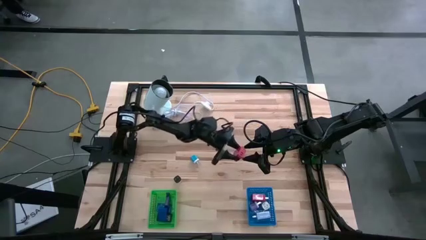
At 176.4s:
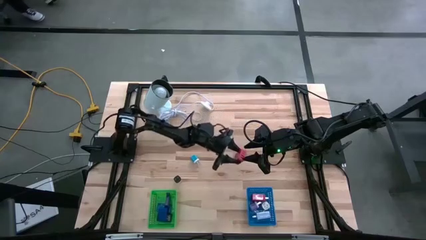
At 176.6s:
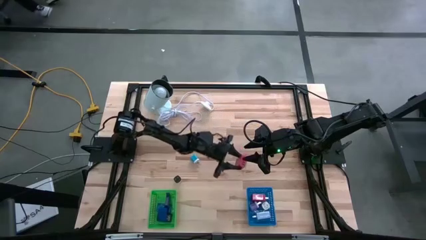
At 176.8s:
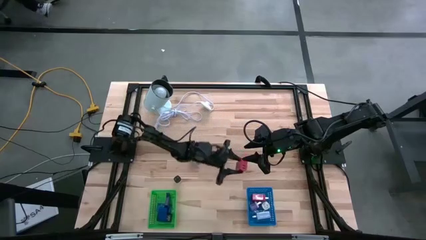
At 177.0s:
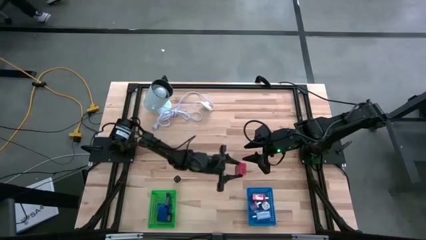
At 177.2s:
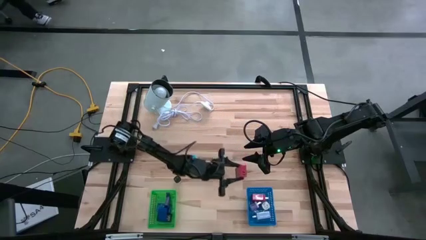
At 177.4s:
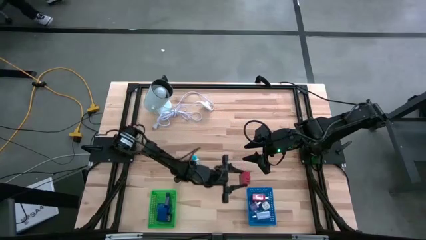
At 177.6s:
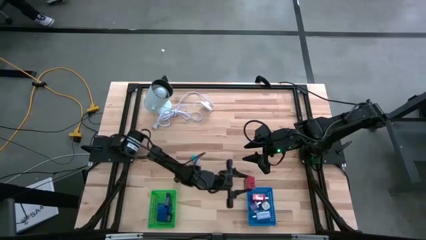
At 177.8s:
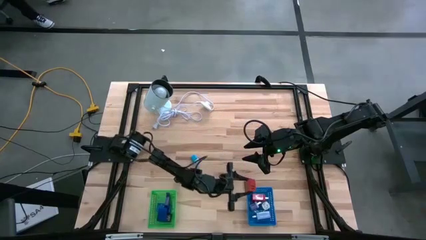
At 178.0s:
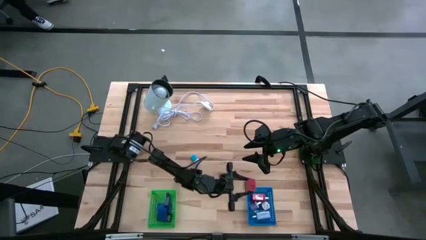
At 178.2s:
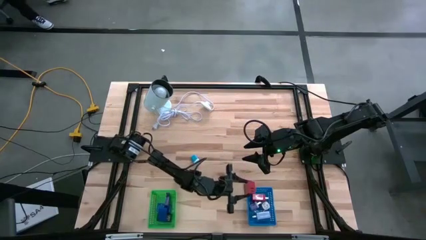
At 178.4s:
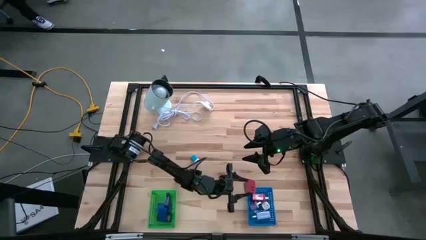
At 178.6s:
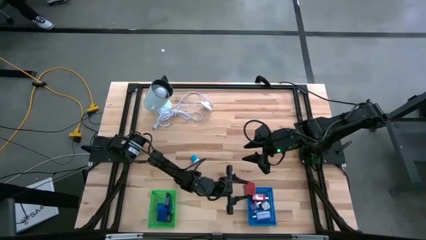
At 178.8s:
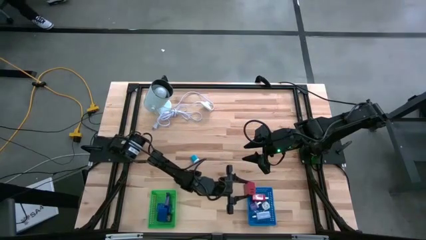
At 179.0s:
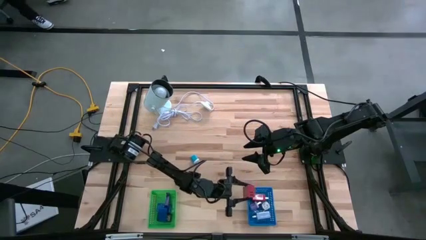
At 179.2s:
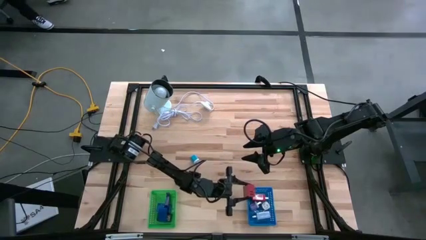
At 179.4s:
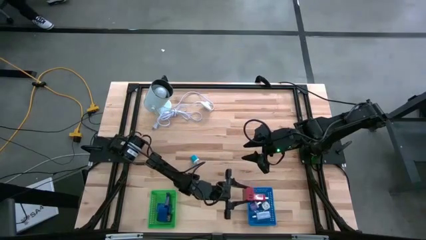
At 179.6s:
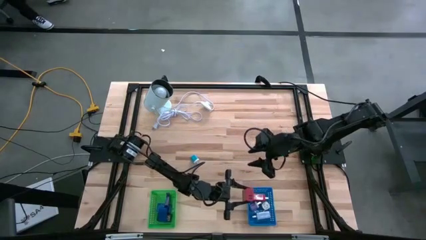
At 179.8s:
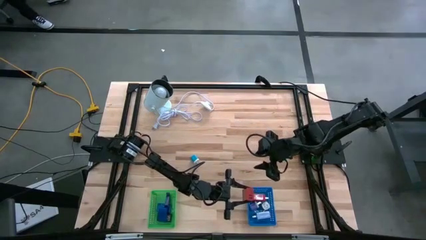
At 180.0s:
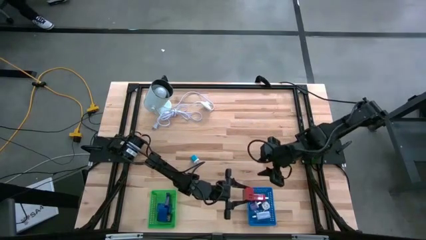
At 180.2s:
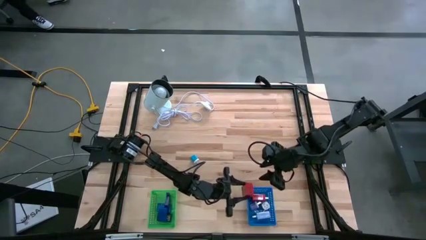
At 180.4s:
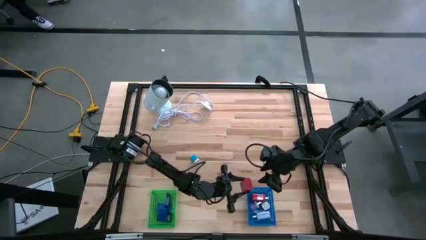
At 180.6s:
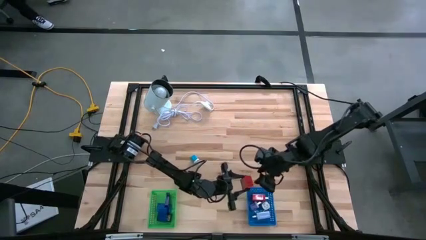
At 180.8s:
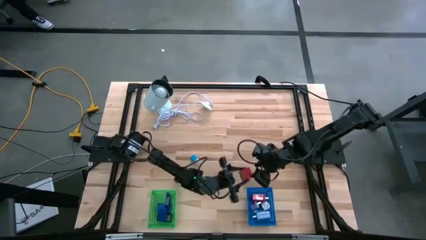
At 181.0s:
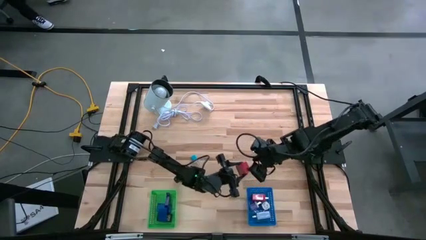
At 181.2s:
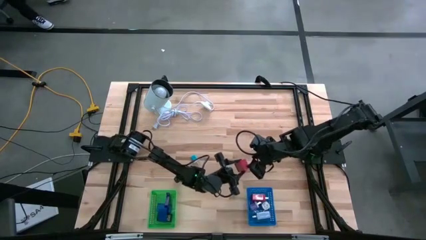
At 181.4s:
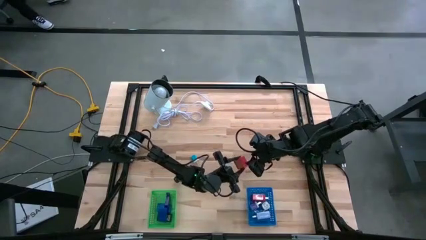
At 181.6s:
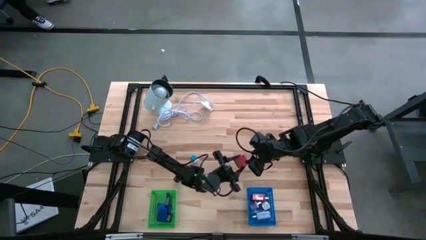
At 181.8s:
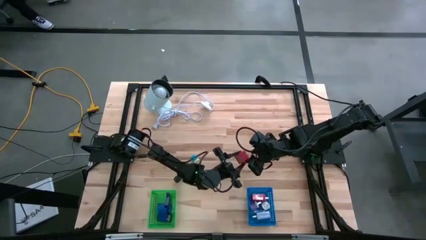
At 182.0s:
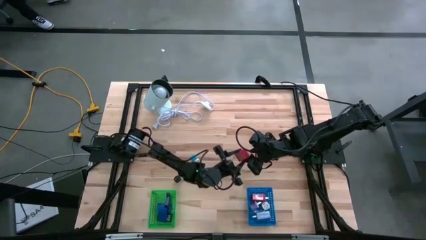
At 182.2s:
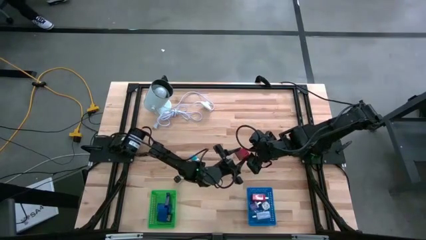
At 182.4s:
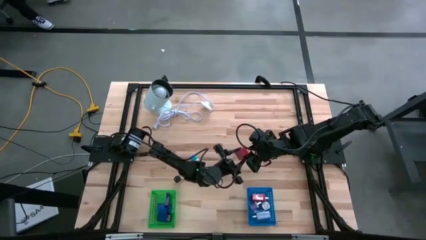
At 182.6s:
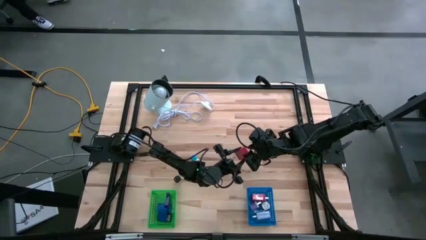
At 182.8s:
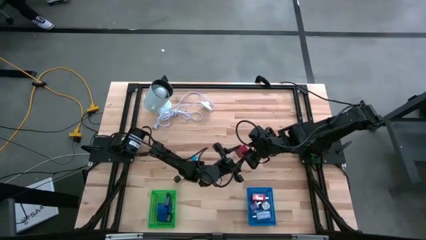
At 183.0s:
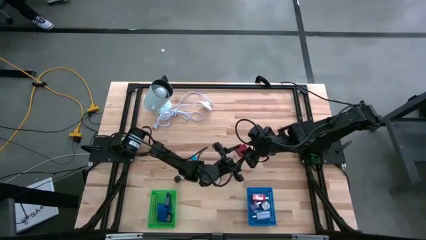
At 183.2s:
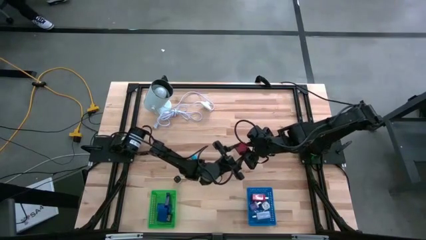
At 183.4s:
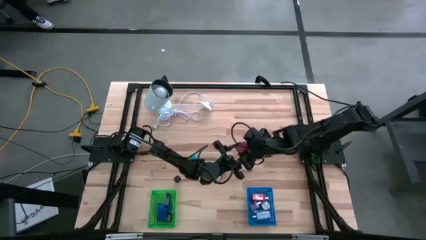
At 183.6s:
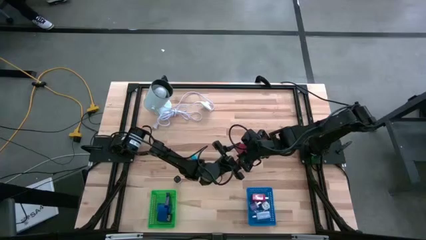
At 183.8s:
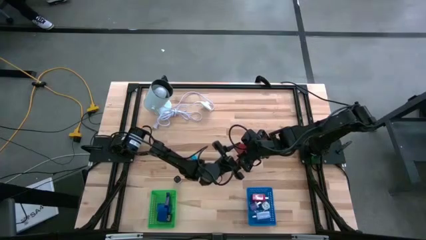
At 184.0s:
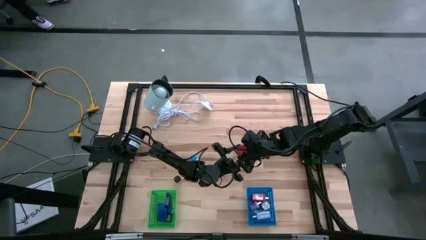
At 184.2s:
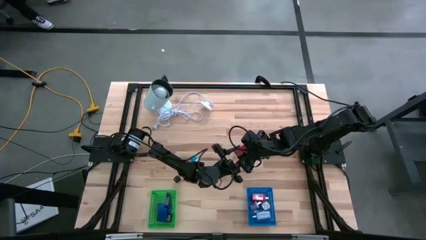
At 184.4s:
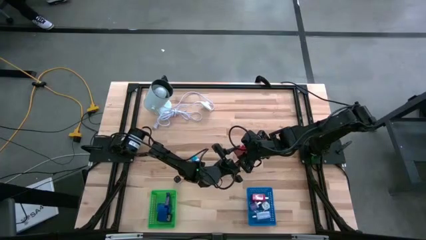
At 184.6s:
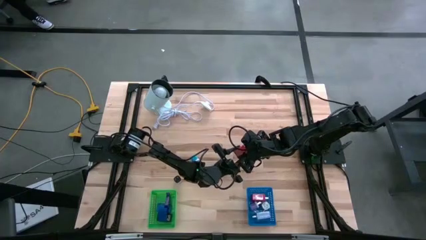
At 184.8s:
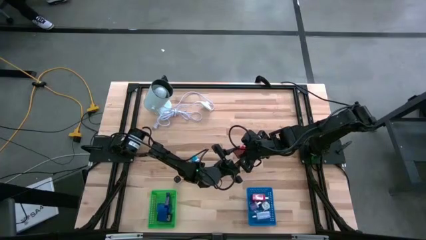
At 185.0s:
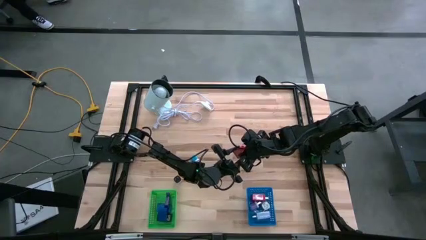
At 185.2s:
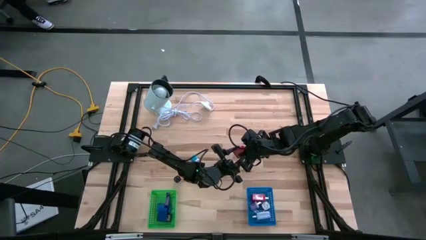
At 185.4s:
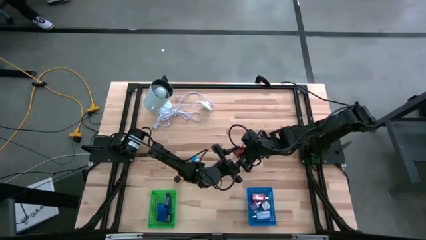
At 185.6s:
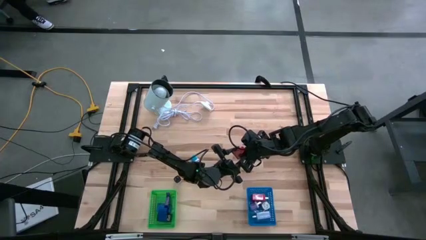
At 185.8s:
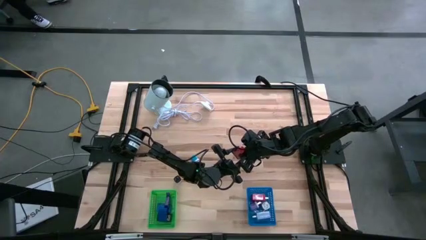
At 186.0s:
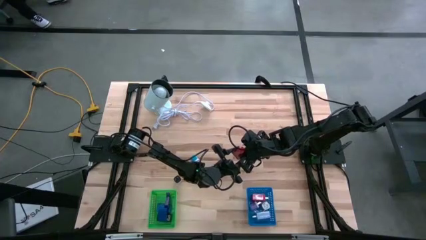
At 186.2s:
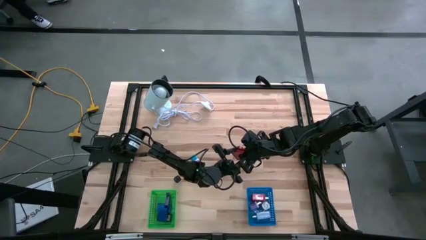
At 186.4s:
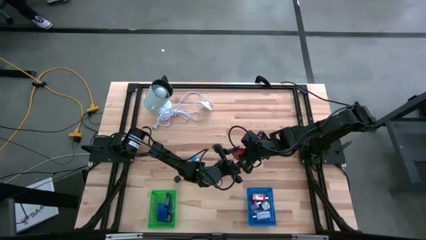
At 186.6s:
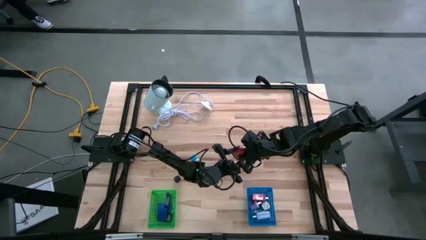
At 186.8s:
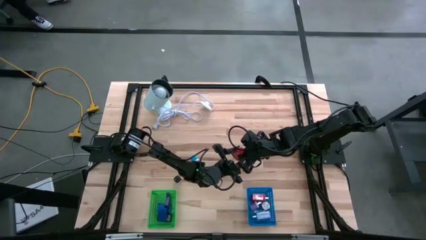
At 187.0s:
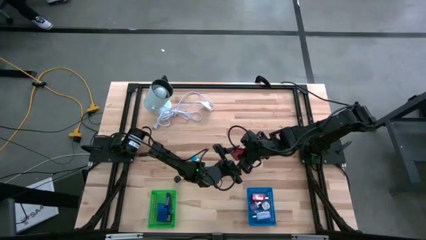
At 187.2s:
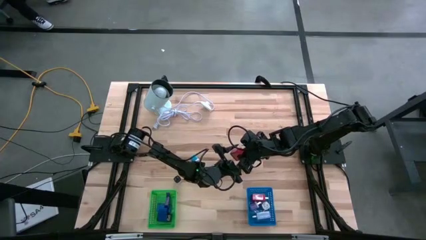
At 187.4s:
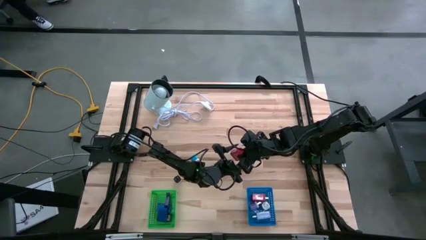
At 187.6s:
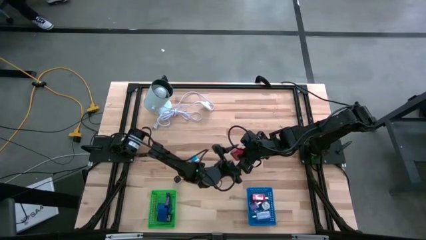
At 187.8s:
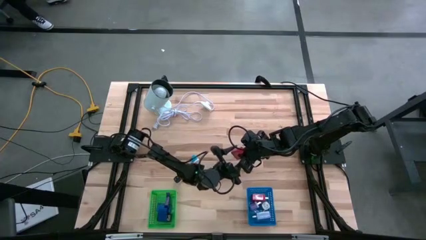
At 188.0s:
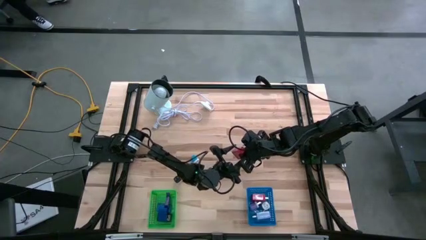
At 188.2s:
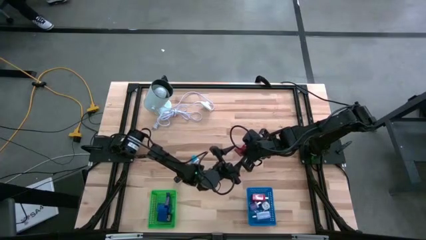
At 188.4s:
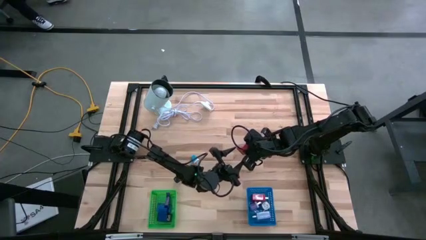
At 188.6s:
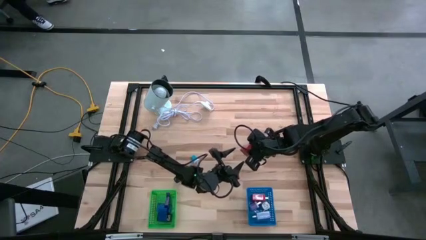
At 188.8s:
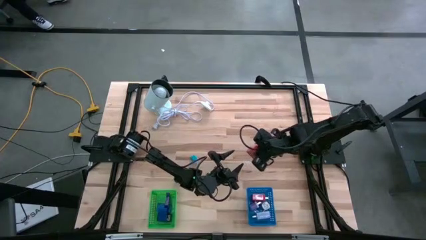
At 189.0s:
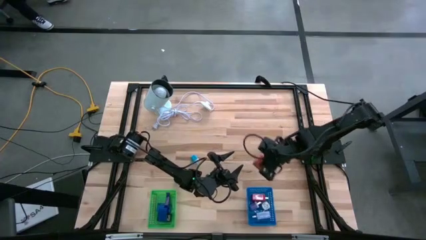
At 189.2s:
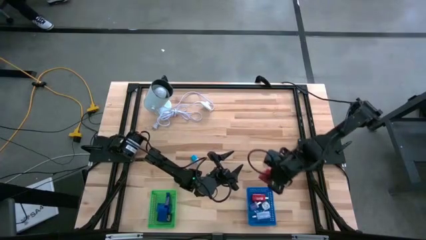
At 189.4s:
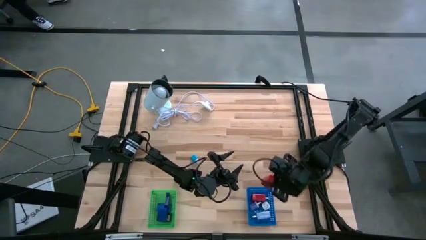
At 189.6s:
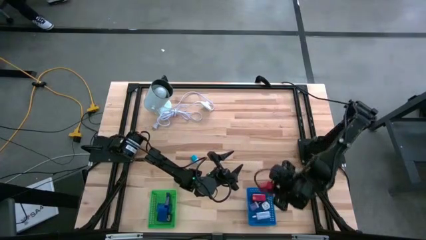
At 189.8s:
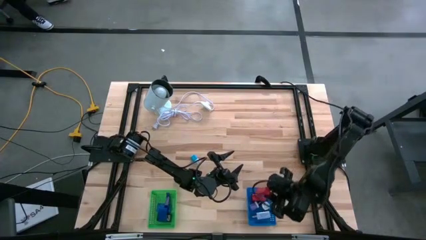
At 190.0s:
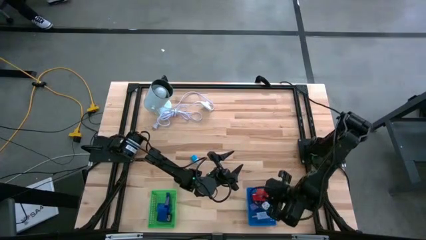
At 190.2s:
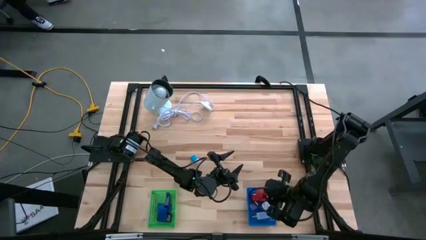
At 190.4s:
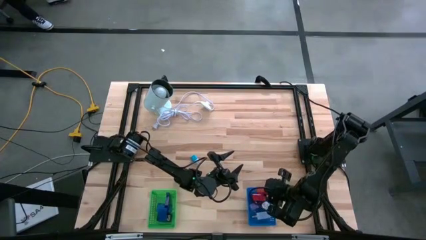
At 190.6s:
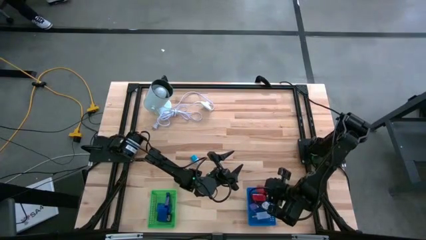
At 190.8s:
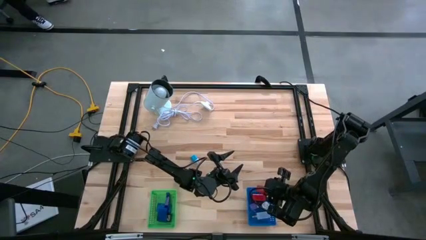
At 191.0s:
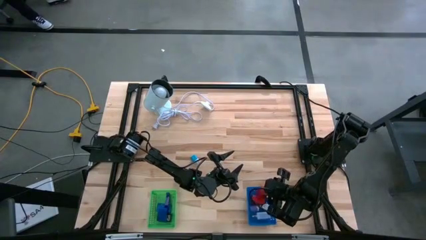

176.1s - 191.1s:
Task: Pick & Place Office items
Put the red charger adapter into the blue bin

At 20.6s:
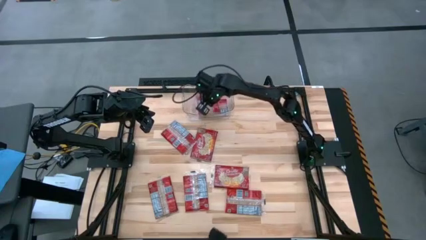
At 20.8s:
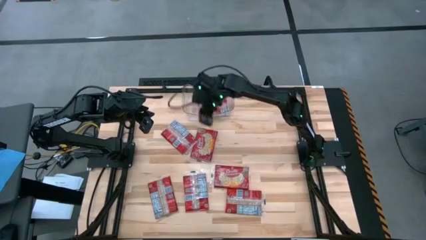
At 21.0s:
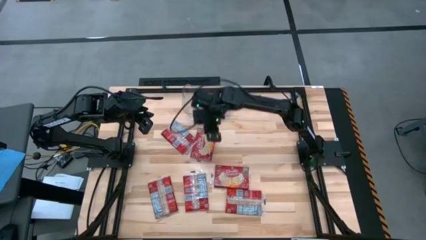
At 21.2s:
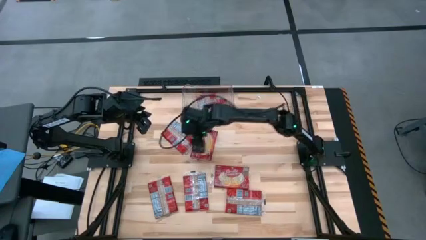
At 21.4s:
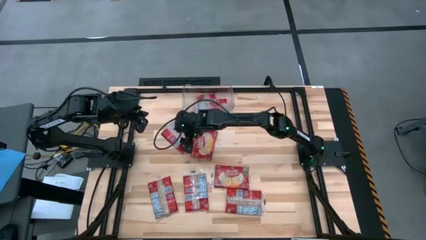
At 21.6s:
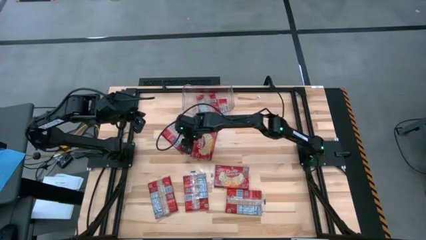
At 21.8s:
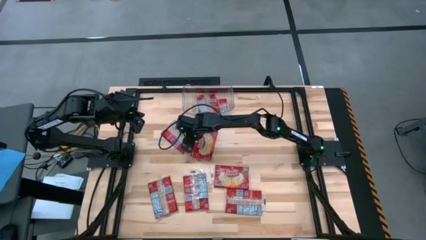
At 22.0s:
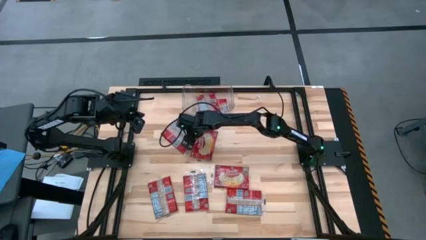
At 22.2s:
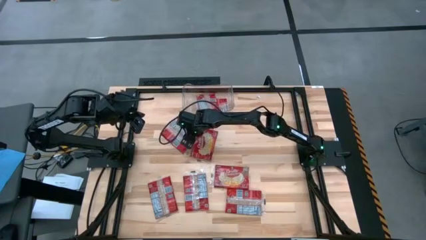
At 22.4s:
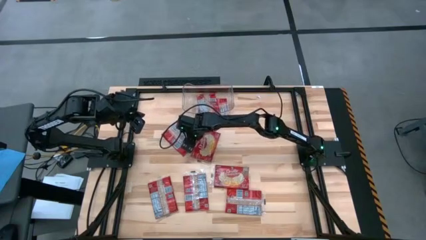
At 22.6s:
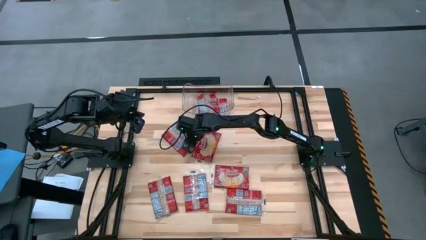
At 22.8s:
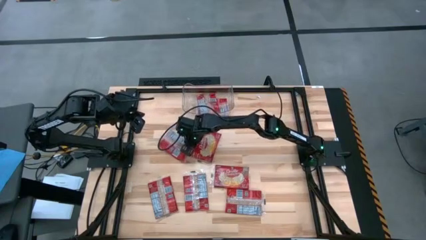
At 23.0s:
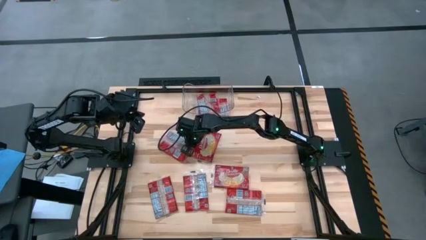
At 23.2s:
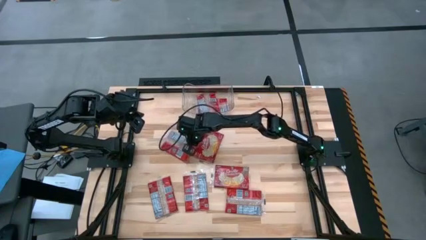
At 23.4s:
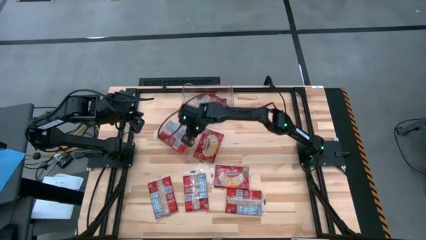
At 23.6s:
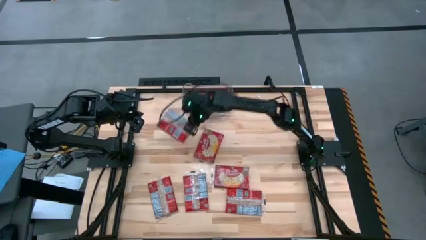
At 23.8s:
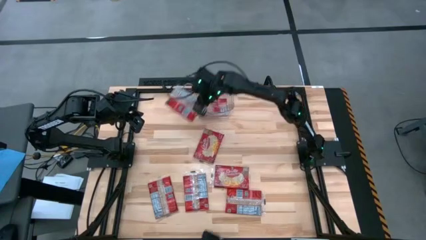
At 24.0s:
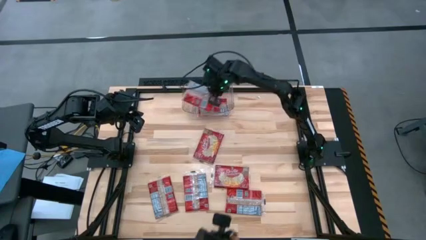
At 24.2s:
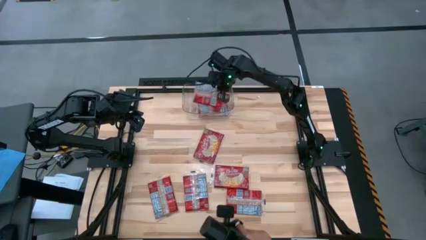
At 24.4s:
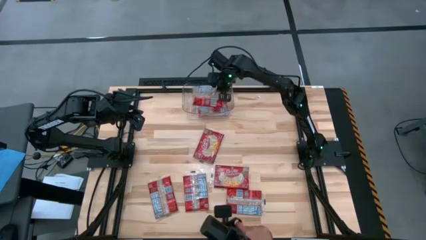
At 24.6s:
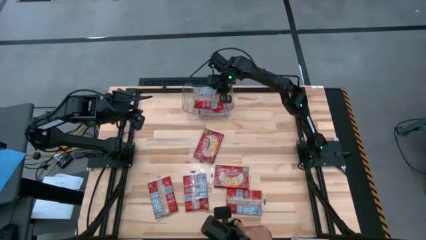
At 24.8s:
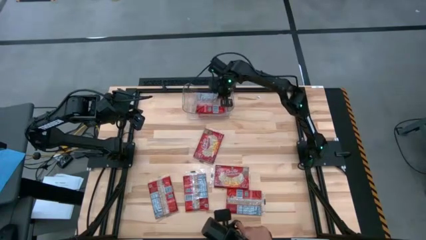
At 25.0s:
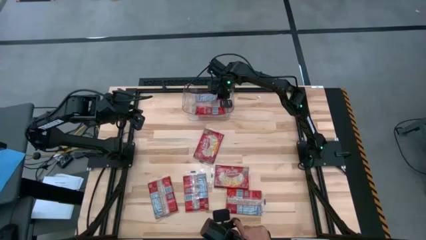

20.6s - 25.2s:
Task: Sort popcorn bags into baskets
Put the red popcorn pack into the transparent bin
